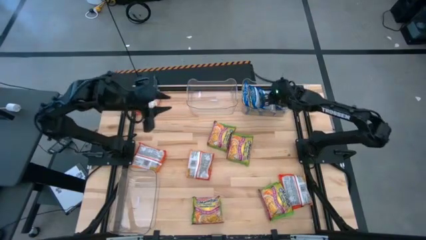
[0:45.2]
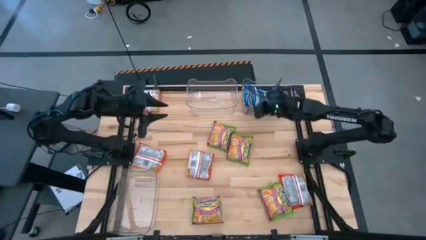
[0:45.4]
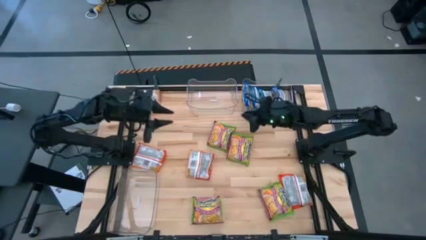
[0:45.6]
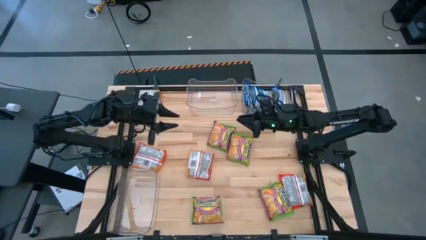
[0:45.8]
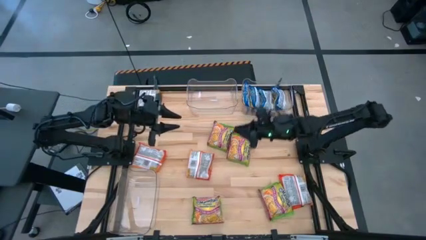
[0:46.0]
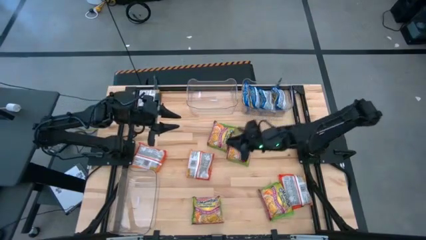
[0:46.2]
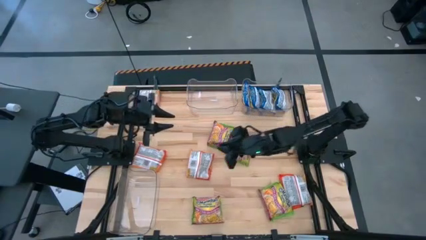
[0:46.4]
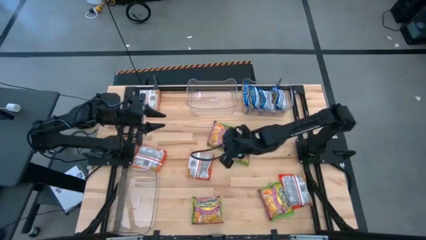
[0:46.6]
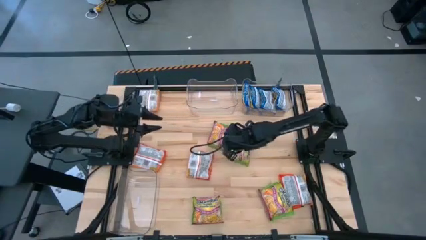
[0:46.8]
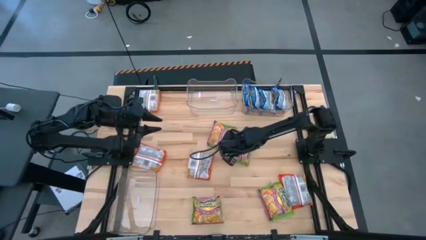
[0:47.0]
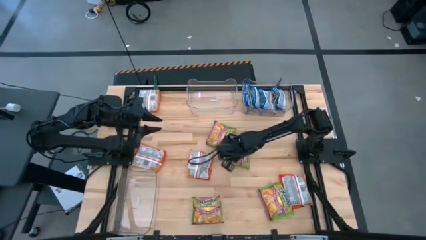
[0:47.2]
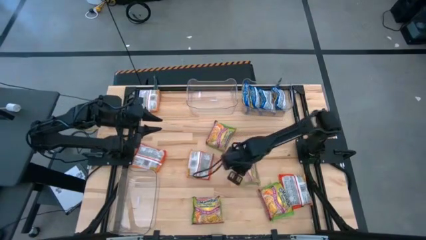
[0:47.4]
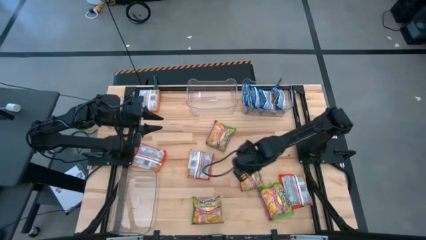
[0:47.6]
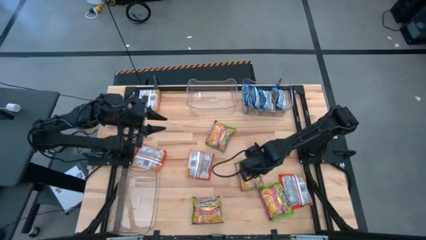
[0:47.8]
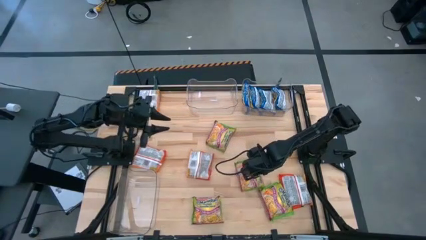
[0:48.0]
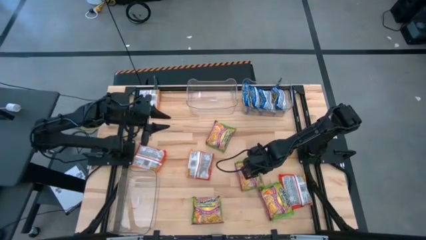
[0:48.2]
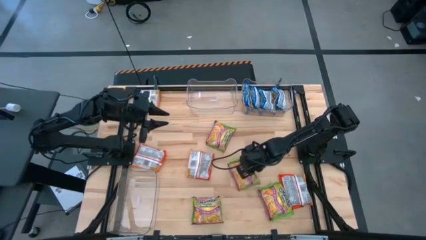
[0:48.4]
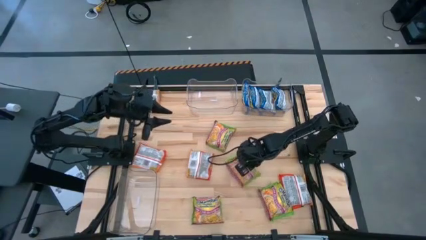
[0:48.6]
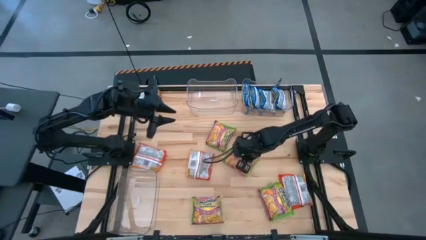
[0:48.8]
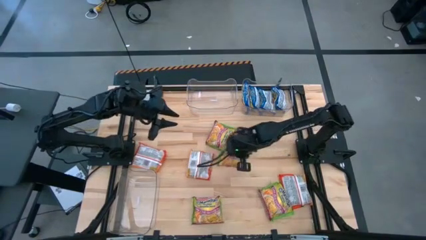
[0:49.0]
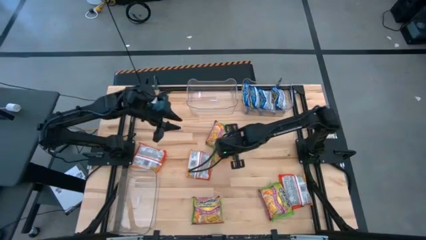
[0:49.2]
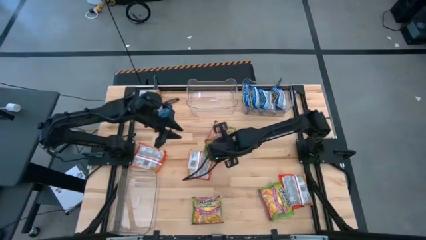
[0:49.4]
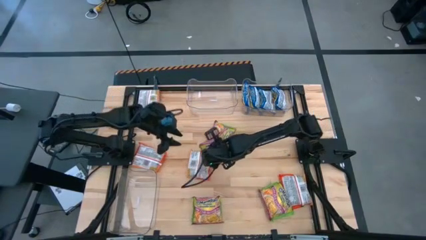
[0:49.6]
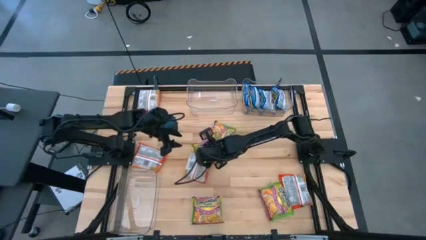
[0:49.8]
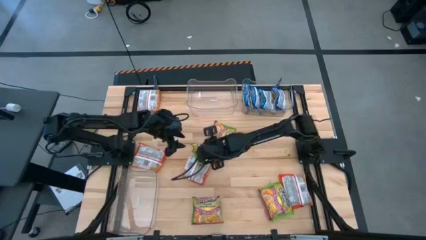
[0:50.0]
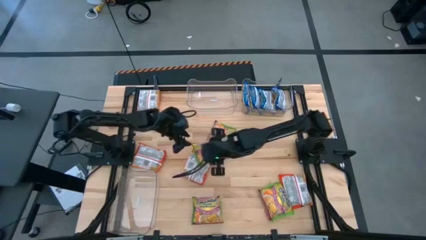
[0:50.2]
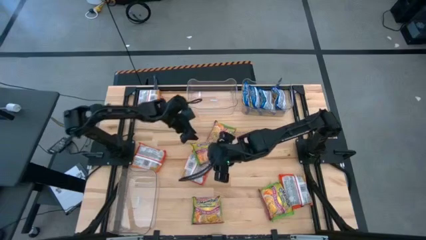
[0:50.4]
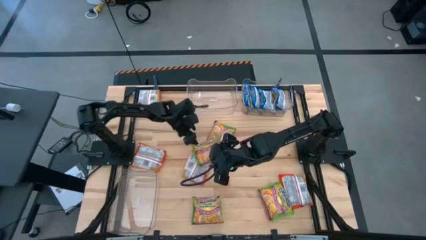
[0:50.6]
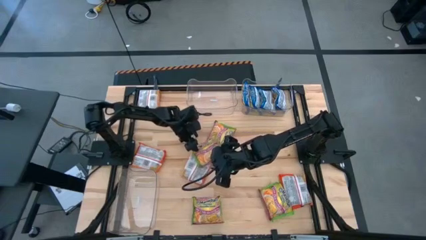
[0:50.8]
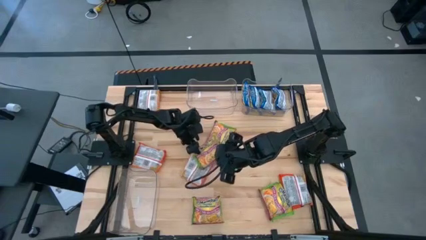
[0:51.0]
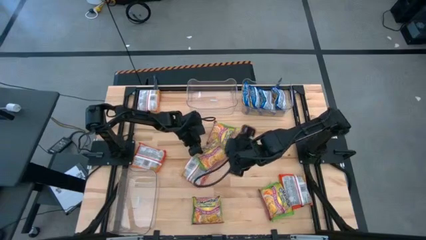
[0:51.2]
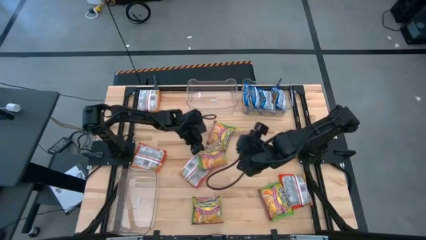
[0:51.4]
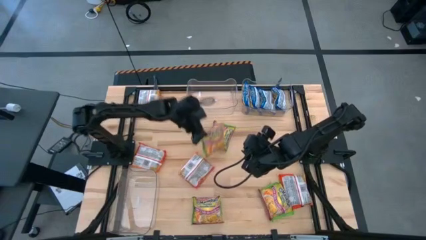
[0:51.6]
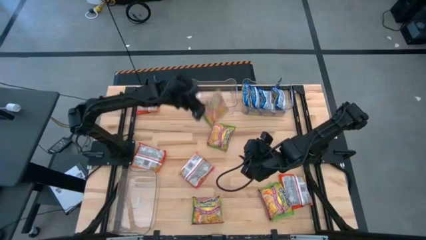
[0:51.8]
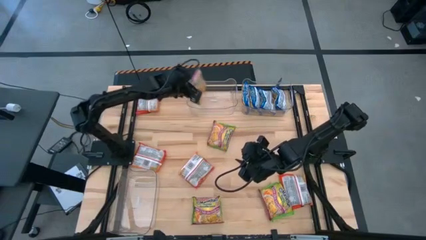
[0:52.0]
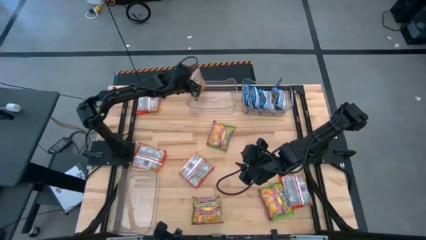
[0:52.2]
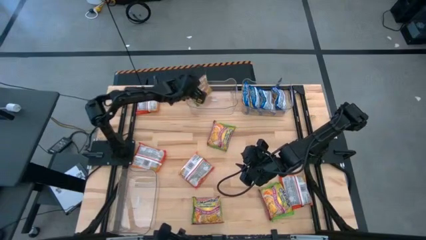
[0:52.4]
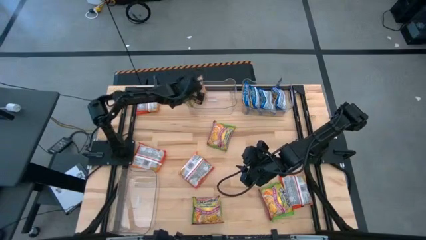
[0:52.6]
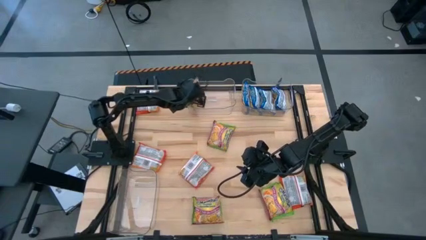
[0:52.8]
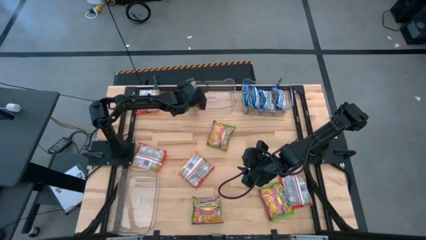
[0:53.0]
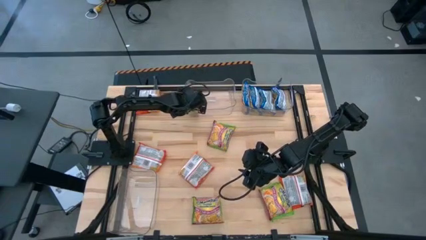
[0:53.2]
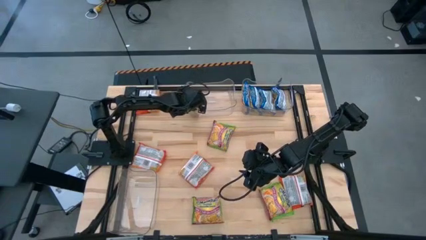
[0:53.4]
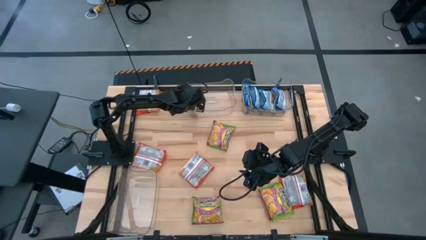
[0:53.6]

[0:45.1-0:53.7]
Task: Sort Maruchan noodles
Put the green noodle pack into the top left transparent bin

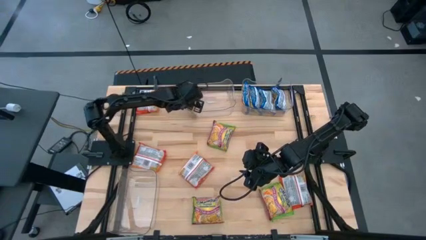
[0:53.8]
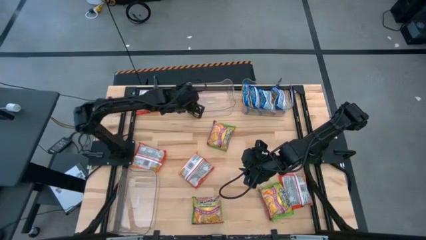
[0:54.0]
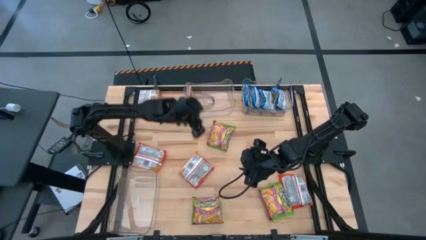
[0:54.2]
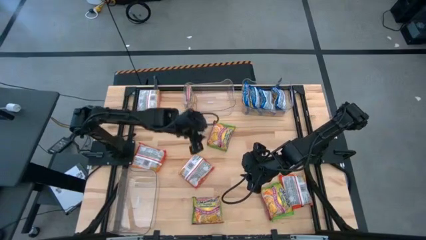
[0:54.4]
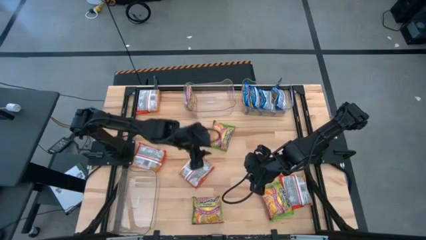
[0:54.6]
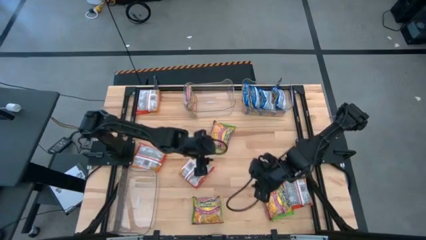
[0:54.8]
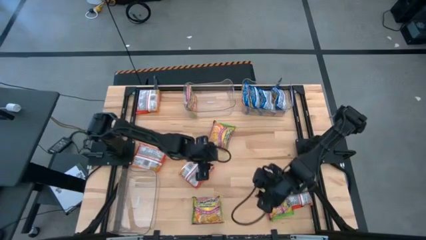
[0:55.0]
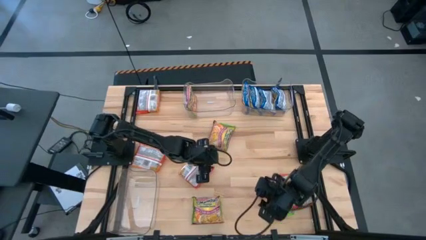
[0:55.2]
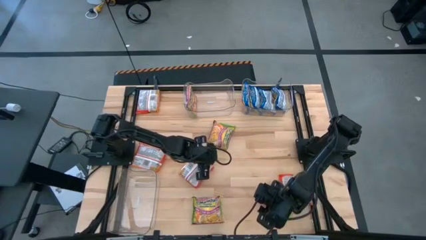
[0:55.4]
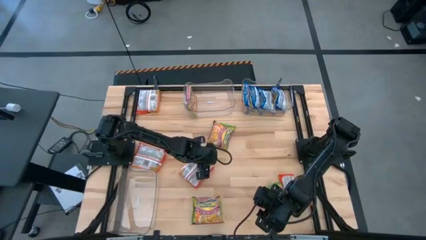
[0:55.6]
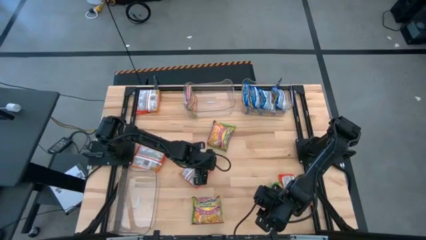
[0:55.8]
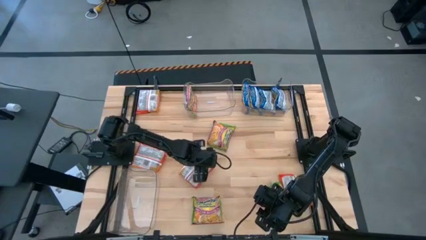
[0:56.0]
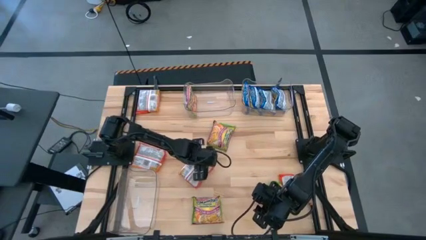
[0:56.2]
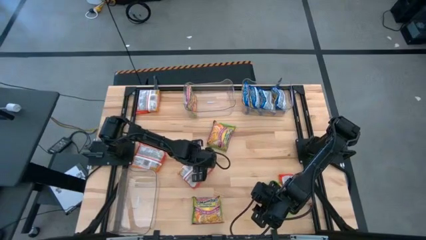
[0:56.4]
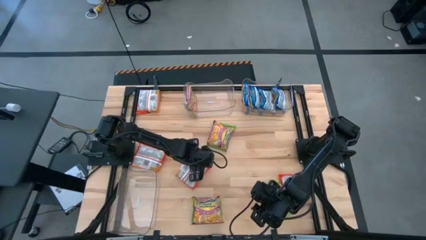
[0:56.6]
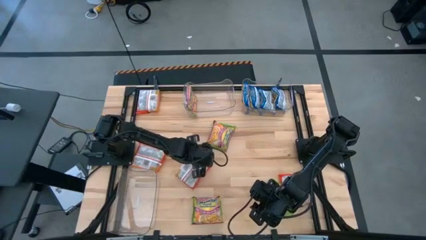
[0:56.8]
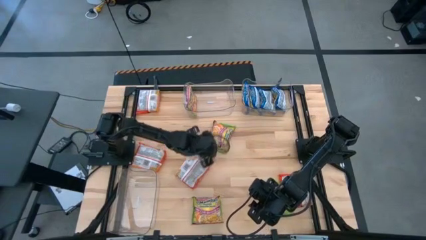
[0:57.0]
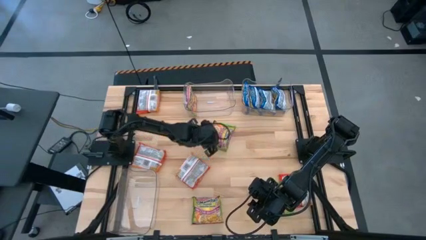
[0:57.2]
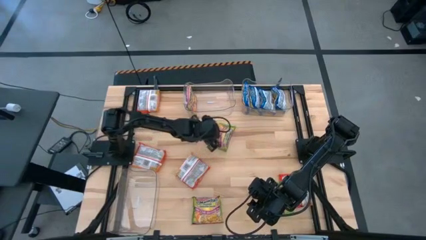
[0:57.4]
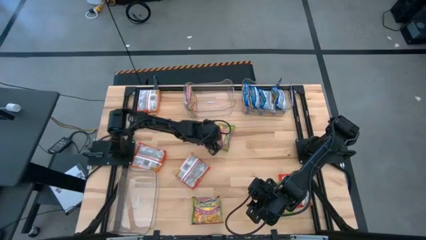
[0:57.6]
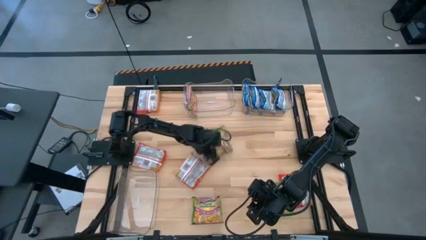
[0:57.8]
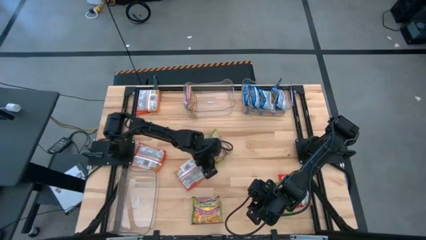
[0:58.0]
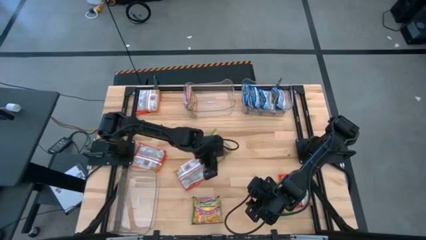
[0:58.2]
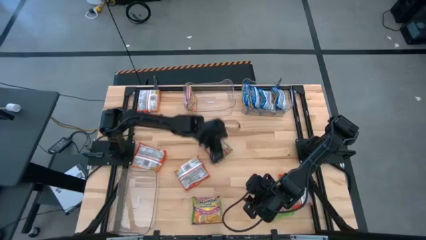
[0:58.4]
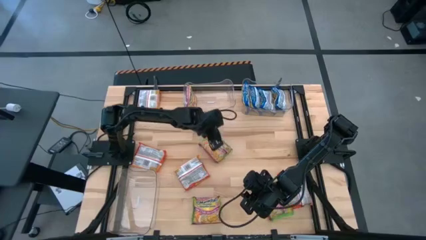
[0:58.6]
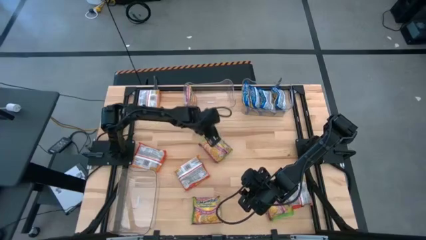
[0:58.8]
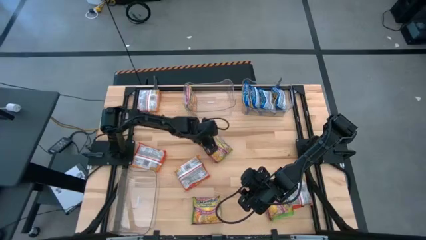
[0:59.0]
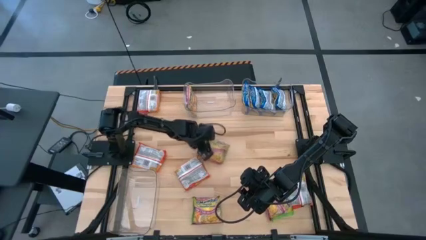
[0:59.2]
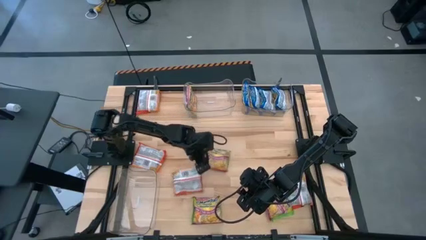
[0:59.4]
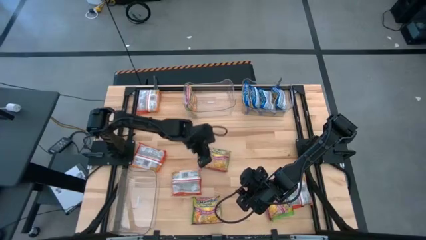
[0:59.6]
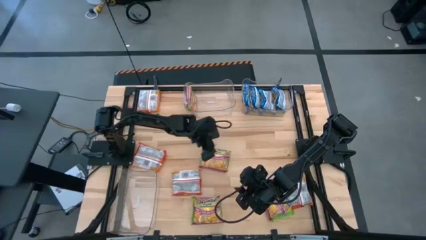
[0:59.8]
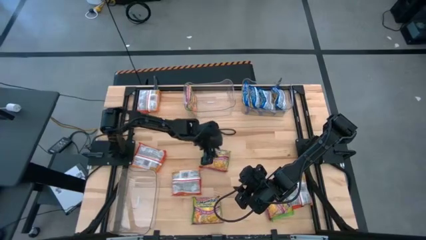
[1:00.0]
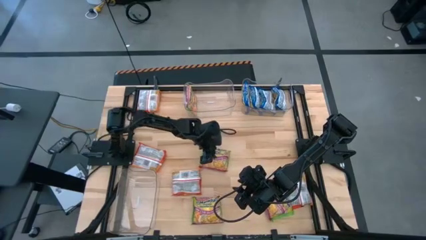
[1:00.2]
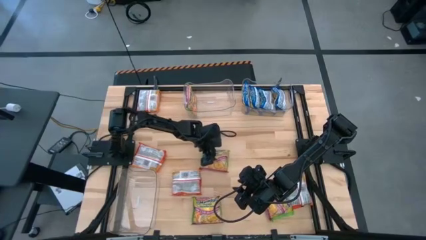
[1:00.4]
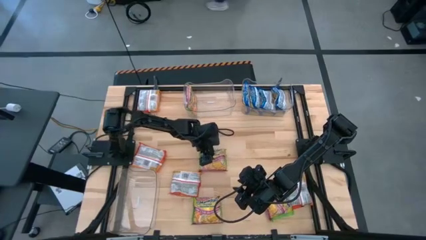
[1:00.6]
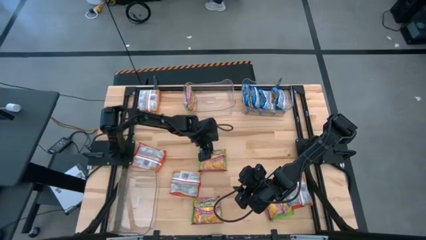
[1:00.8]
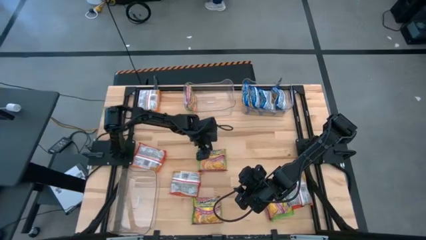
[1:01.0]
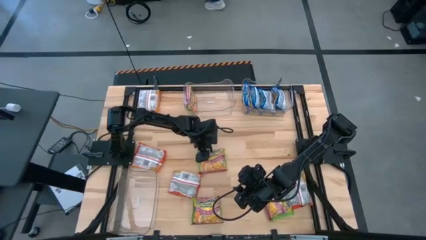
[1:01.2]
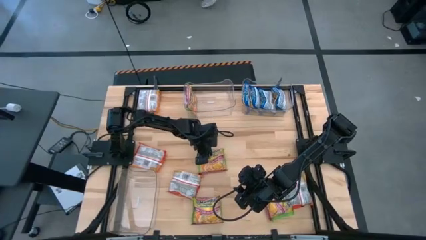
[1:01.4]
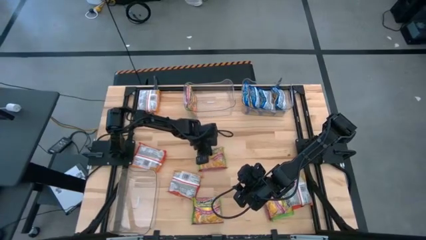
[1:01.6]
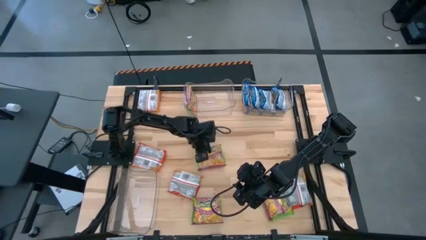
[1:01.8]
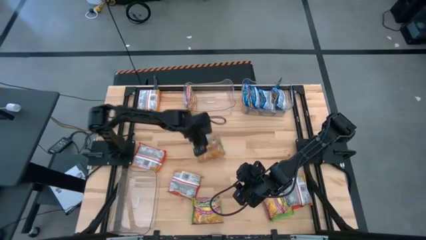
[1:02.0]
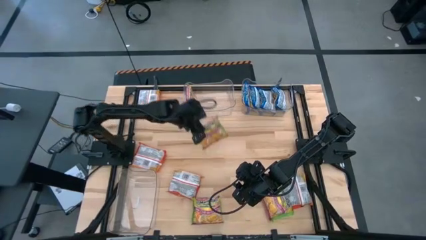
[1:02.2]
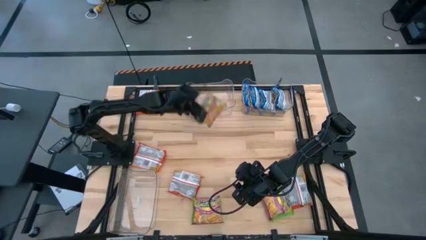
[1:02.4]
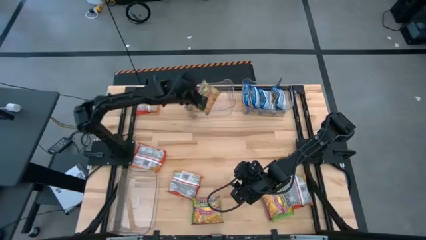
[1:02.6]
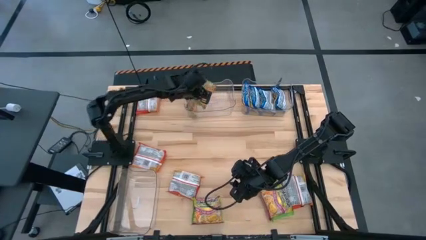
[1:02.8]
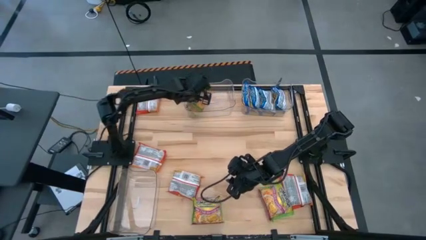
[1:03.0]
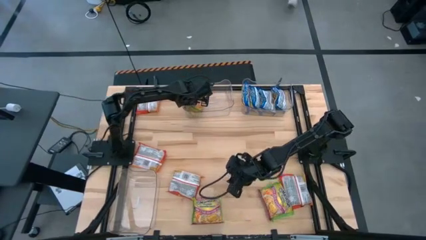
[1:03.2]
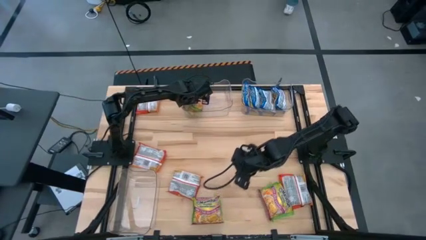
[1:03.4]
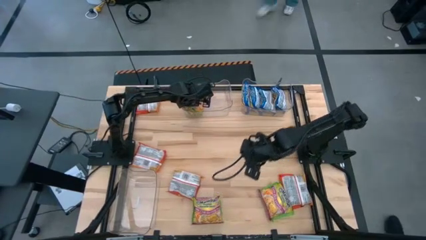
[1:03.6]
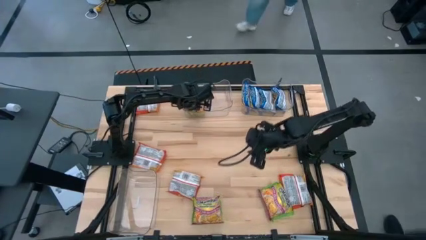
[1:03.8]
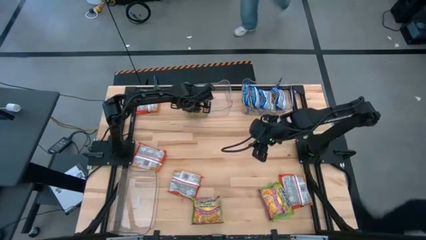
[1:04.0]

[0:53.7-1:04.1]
Put the green noodle pack into the top left transparent bin
